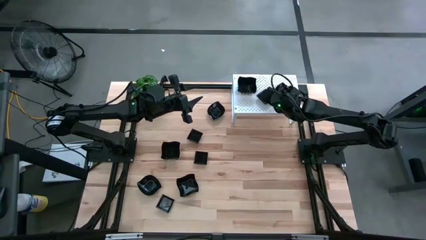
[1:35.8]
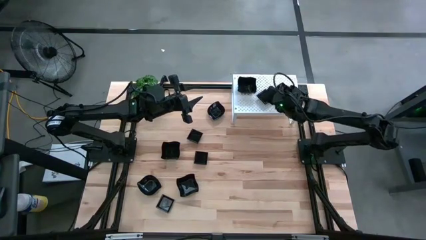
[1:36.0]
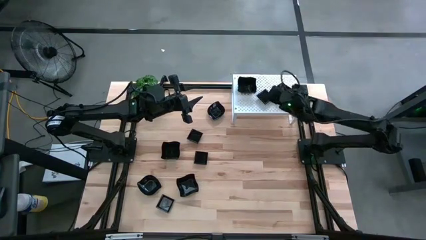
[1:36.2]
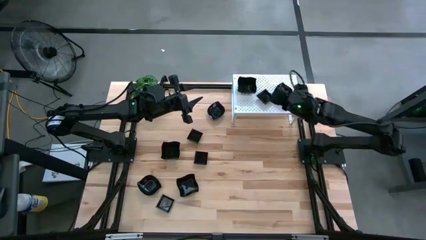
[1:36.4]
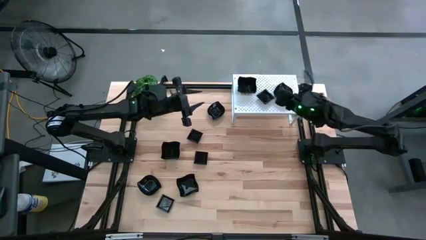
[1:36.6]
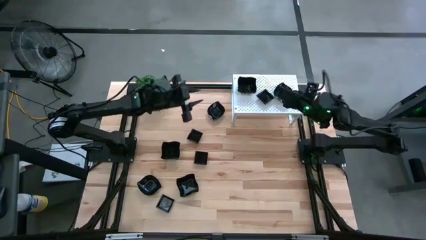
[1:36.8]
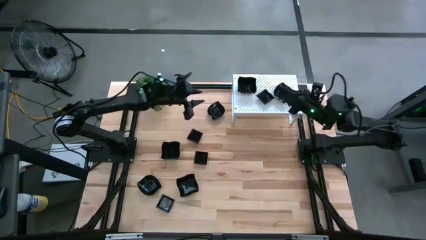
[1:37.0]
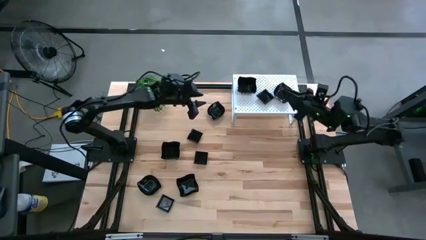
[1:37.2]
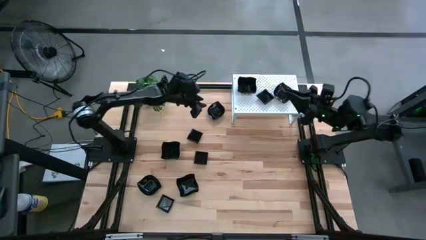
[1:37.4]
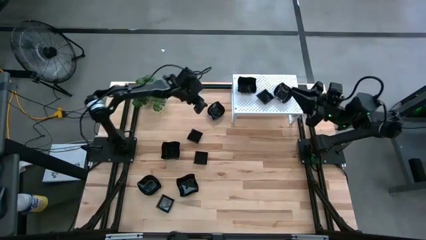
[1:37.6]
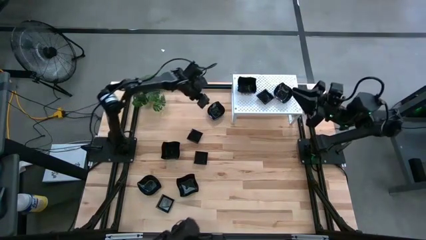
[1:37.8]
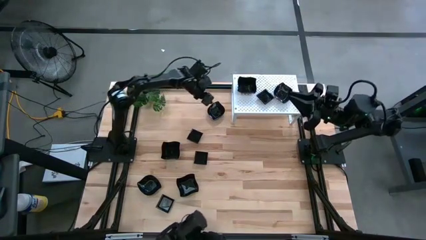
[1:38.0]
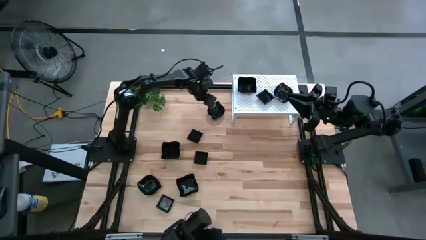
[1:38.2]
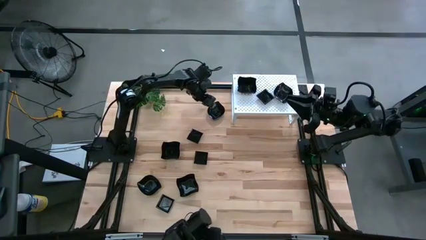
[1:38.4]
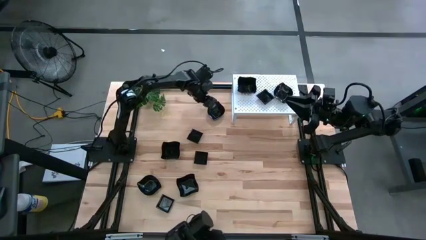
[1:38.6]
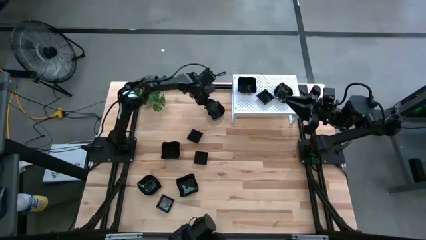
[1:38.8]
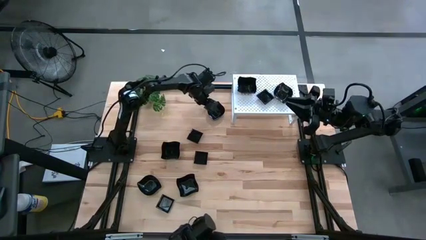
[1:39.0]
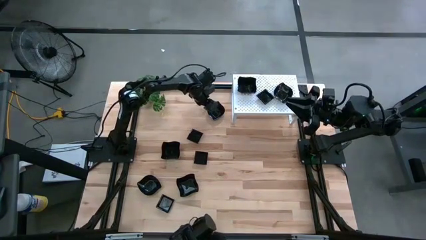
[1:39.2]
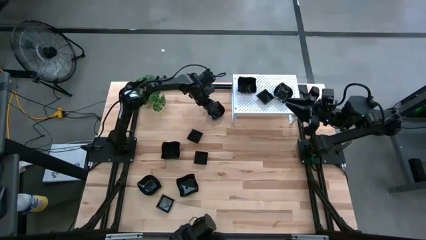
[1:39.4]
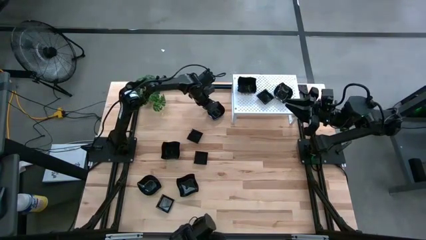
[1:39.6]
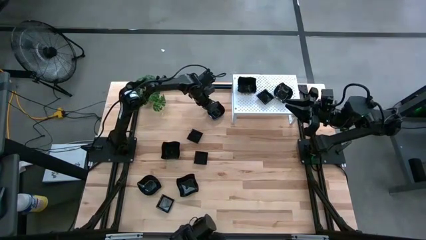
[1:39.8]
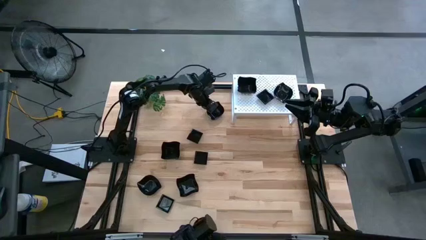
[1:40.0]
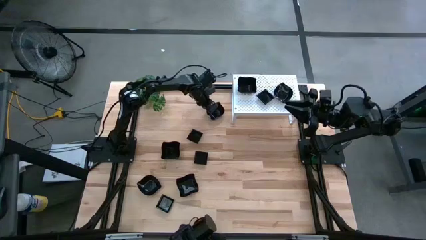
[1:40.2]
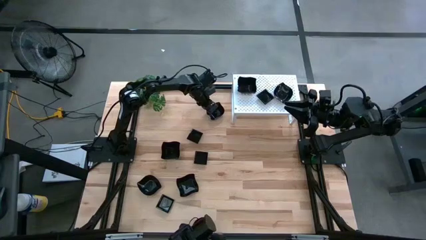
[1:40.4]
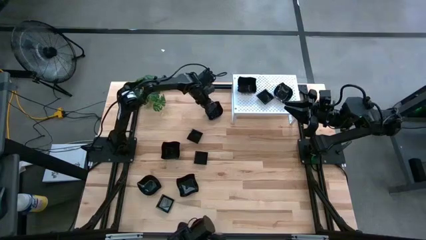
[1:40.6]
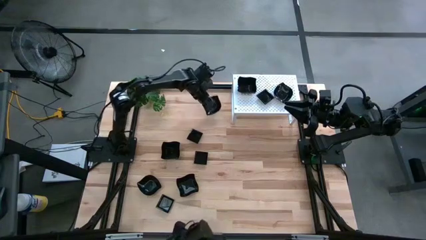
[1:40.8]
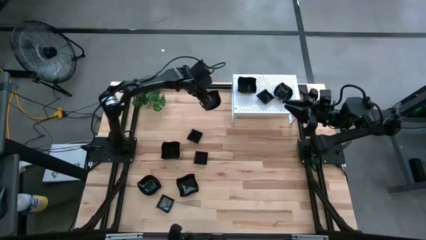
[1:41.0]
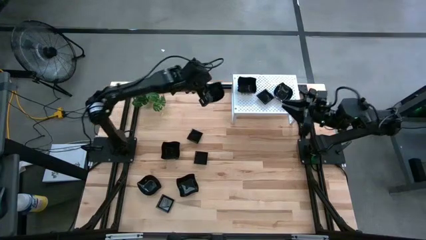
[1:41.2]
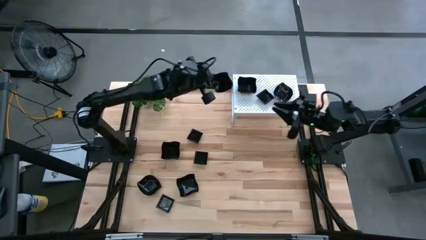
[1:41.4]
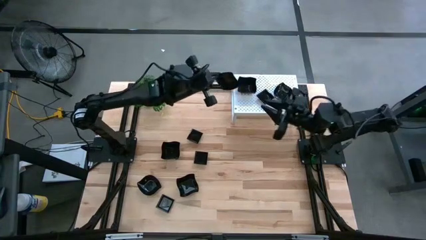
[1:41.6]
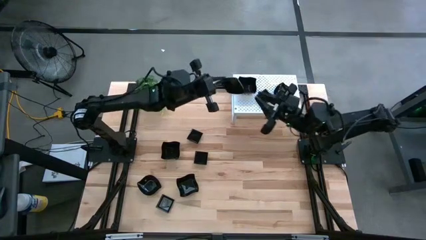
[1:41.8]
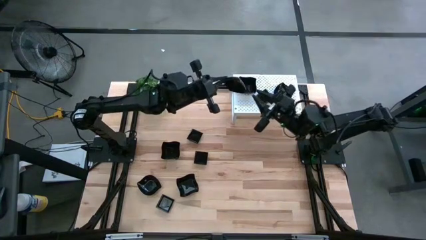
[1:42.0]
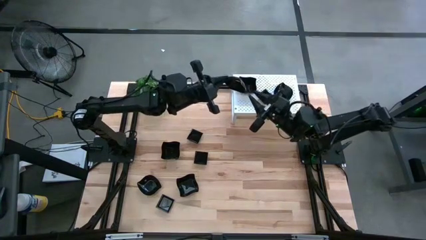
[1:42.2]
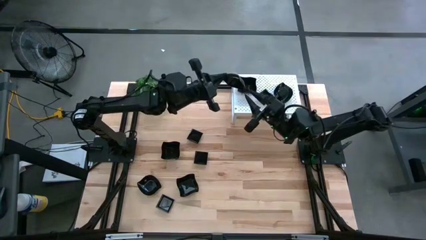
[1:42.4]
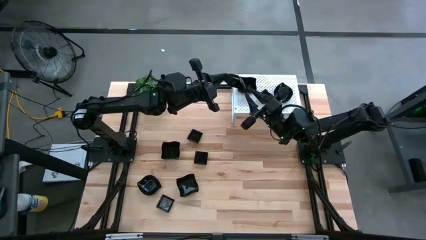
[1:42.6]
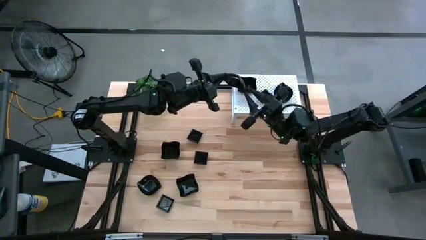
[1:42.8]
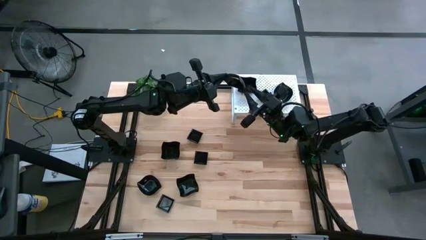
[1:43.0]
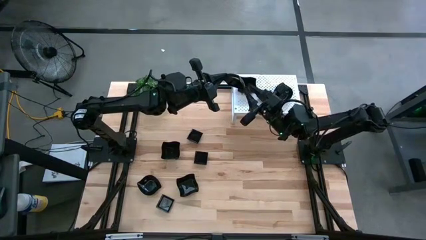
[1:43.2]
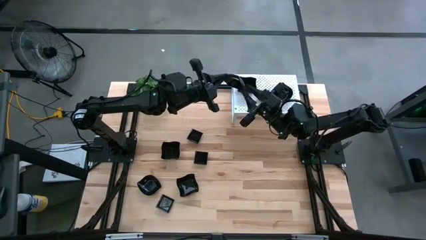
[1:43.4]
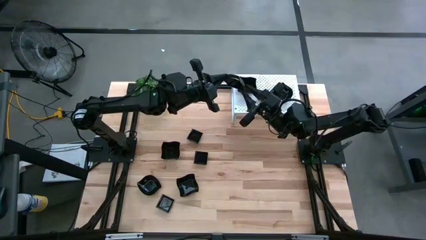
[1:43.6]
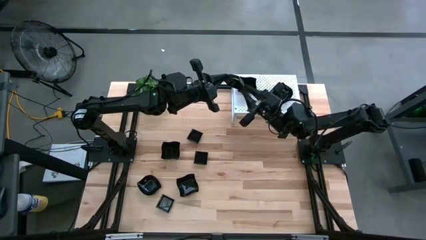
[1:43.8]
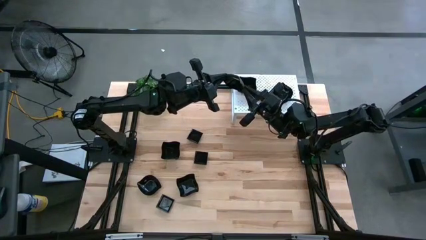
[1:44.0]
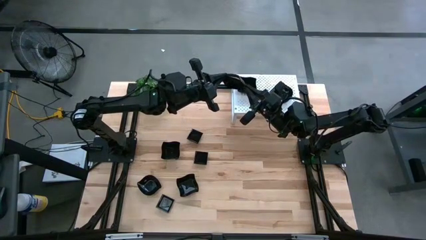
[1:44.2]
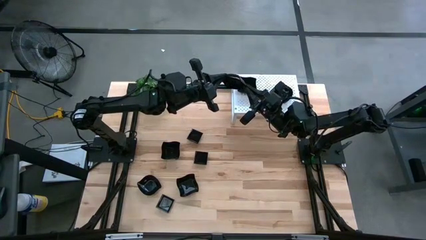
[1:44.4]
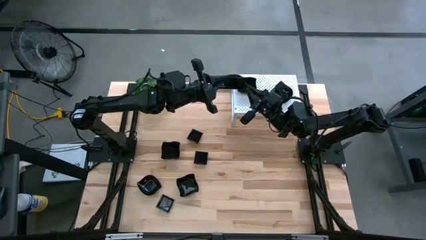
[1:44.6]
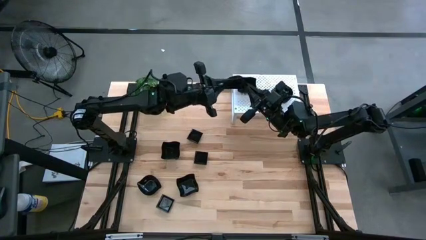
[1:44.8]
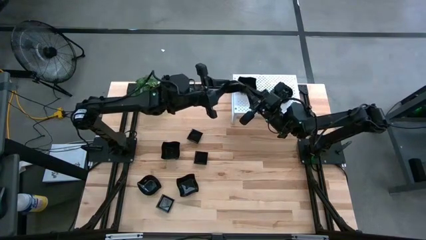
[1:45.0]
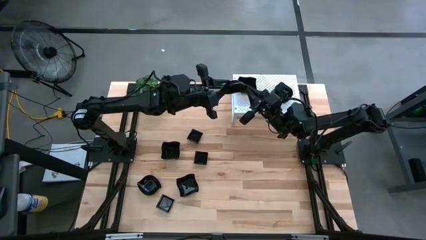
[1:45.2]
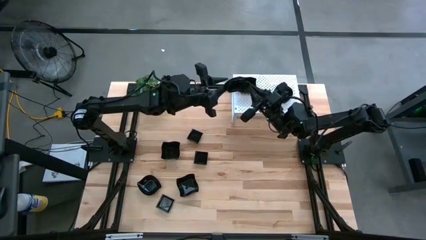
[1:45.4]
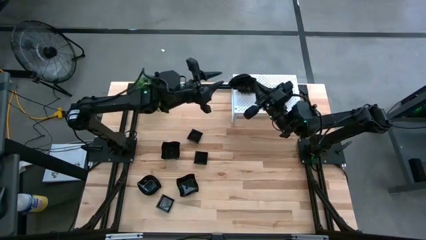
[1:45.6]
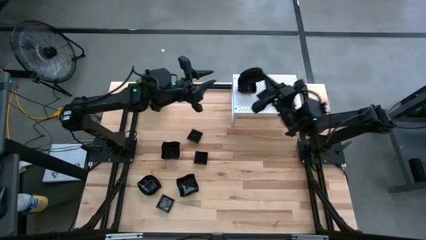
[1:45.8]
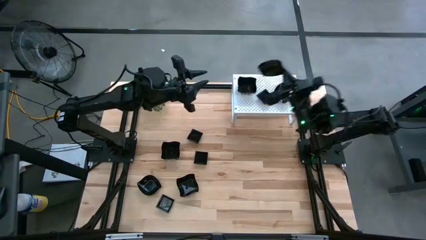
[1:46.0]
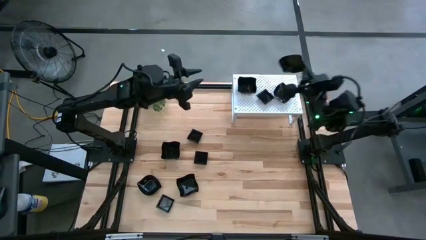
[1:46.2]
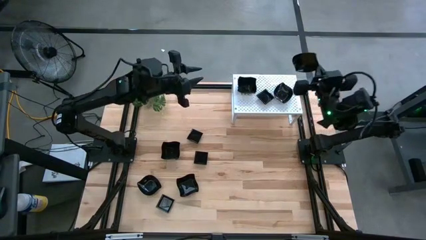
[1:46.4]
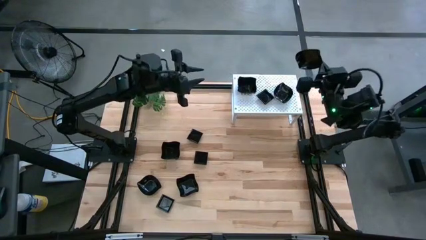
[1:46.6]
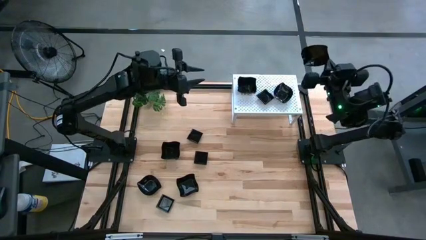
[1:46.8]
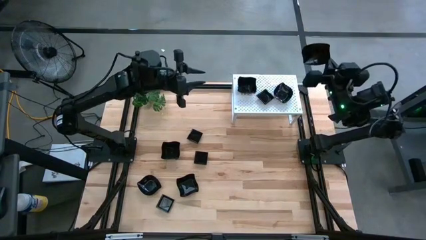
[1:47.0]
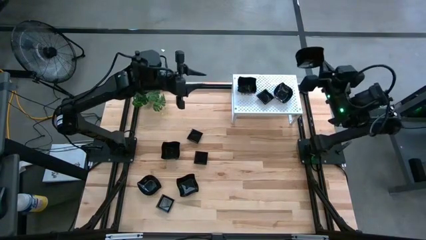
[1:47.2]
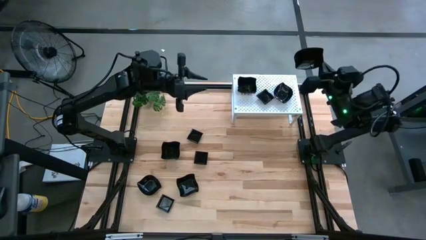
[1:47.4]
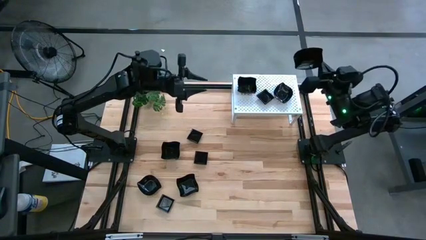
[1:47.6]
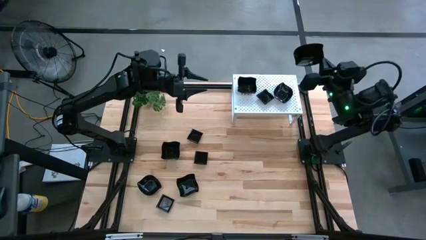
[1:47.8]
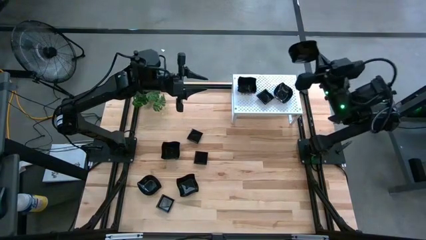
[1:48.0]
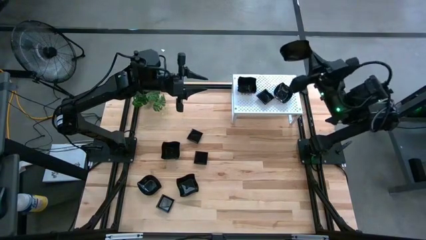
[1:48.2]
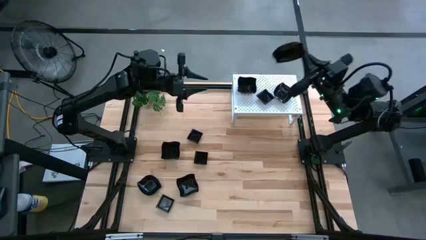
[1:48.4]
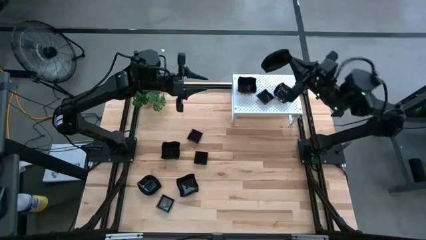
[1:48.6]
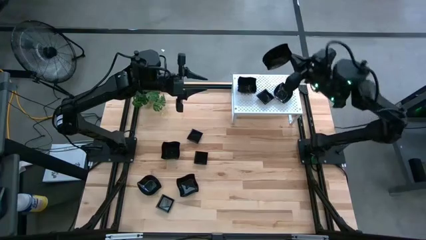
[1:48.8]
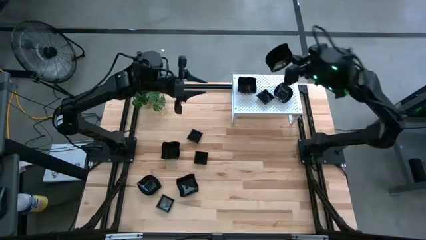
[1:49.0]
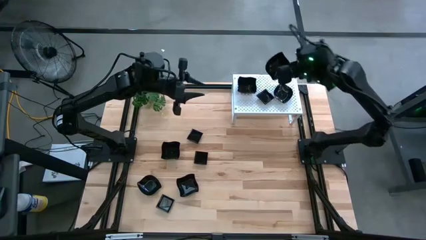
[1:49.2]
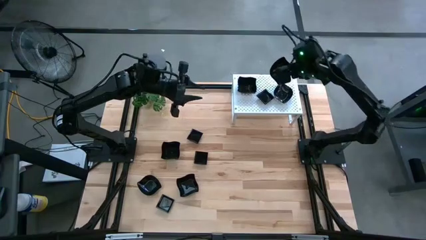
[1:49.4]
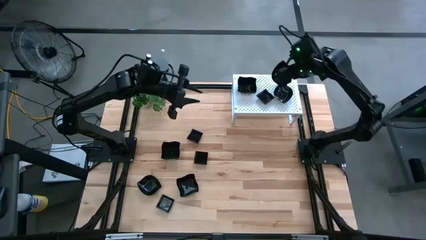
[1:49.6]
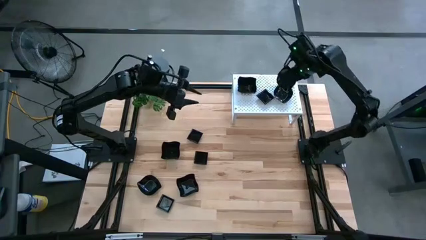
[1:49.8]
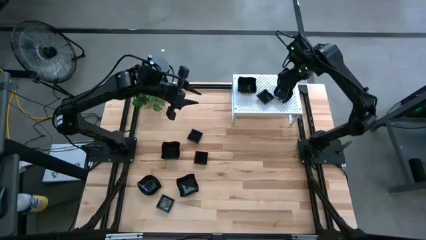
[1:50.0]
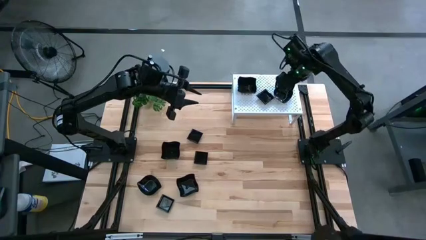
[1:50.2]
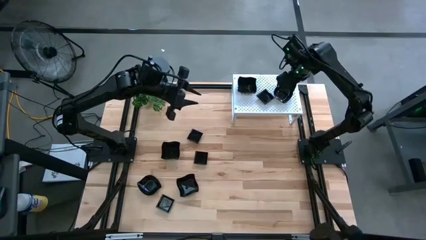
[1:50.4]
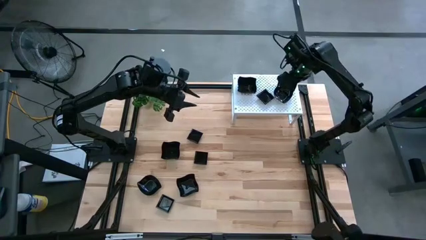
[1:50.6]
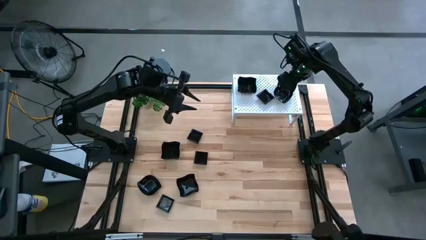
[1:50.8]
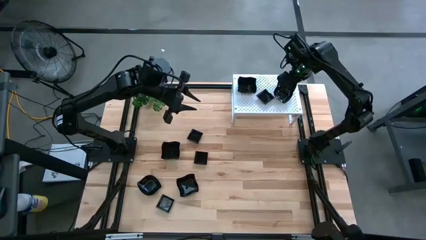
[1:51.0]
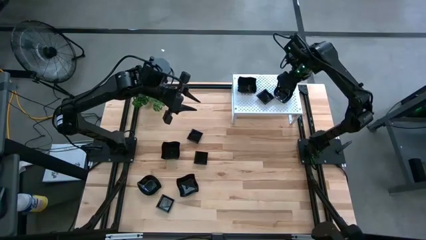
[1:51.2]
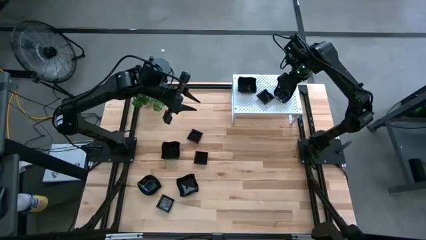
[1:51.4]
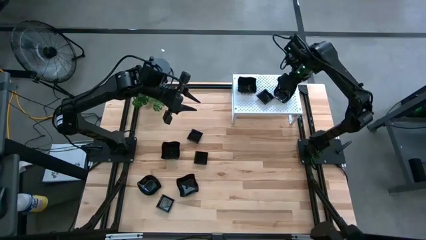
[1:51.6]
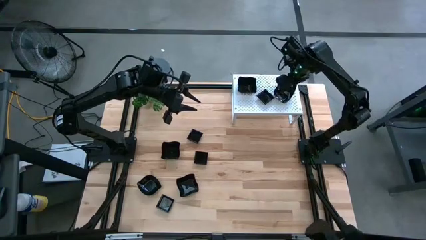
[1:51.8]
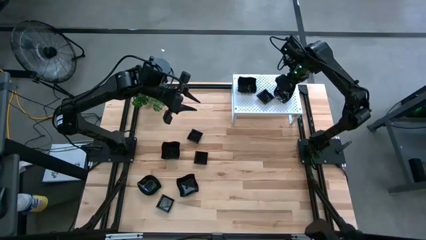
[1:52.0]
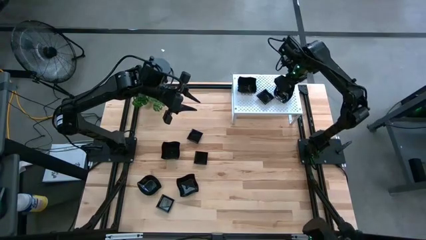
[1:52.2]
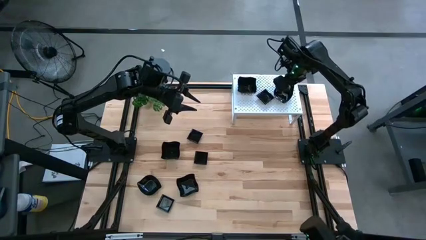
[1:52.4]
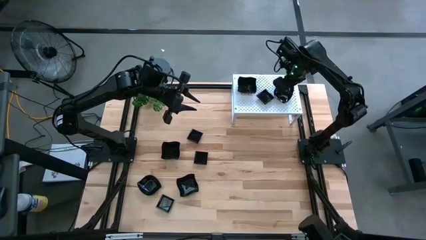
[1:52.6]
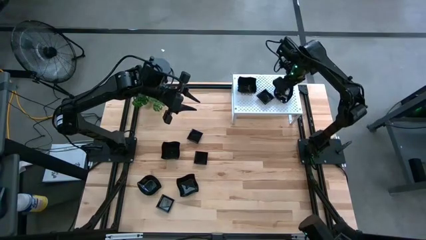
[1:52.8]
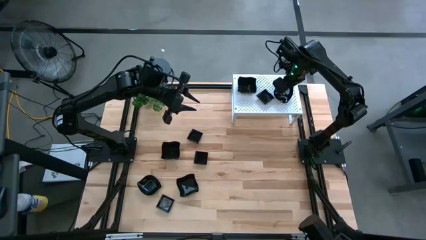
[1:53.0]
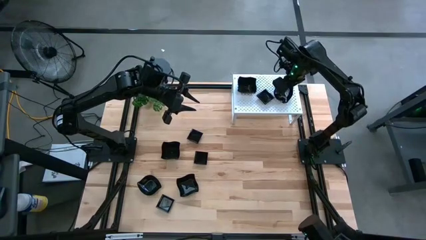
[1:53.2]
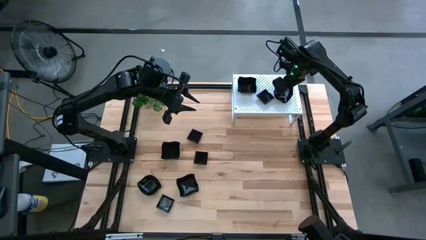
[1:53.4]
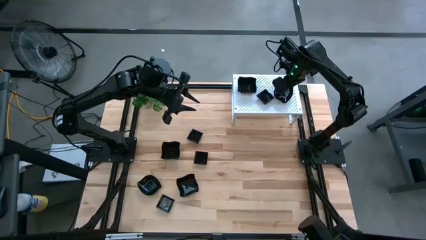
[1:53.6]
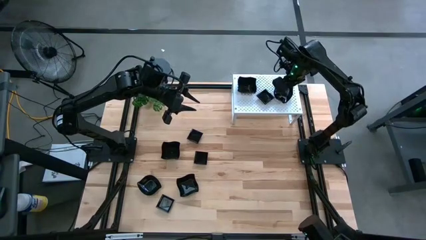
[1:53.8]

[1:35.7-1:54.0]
Task: Pick & Place Mini shaped plates
Stack the leaf-shaped plate on top of the leaf-shaped plate on the shelf
